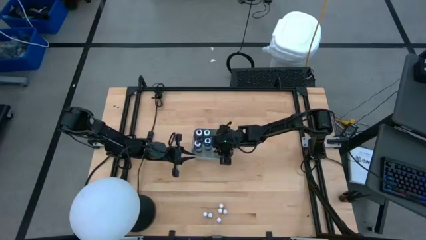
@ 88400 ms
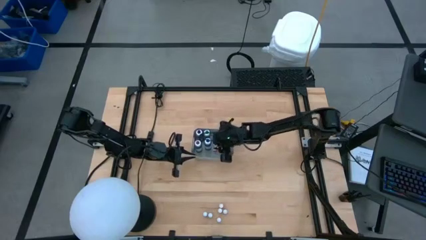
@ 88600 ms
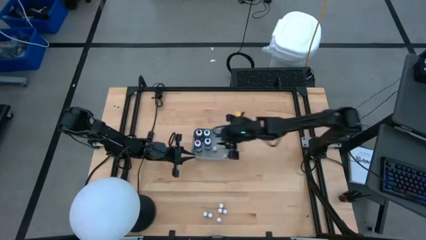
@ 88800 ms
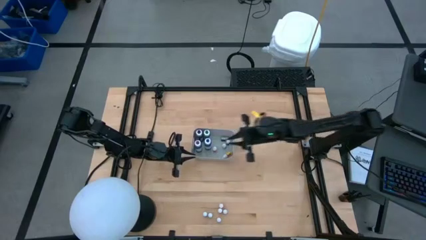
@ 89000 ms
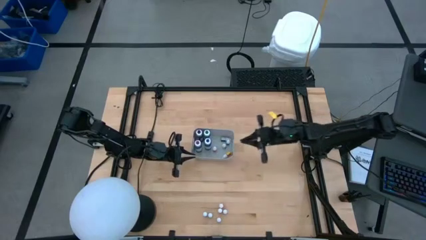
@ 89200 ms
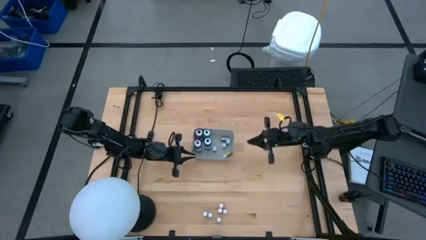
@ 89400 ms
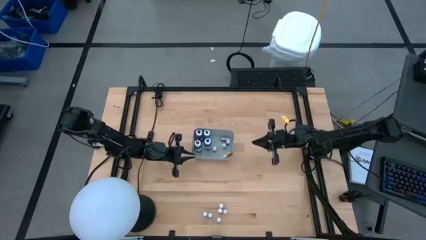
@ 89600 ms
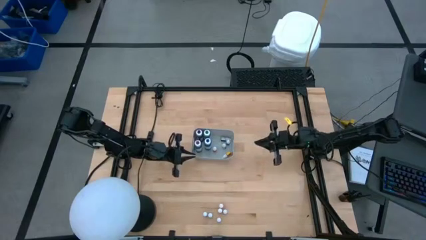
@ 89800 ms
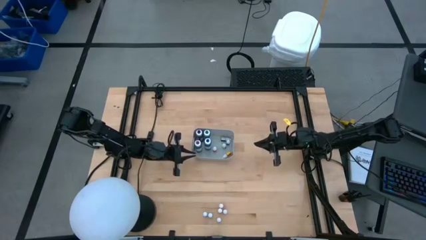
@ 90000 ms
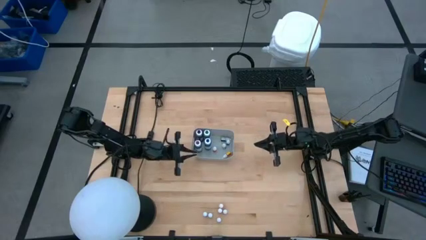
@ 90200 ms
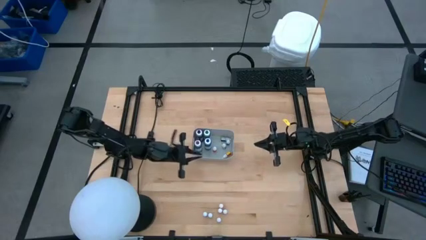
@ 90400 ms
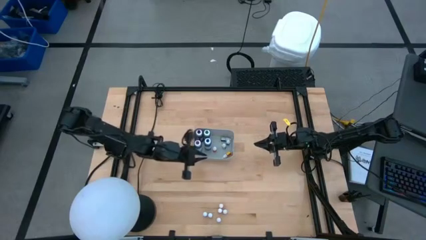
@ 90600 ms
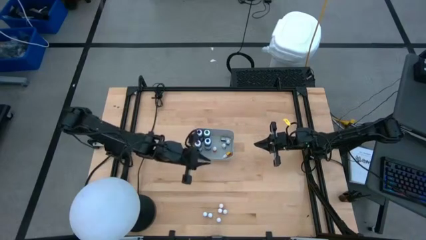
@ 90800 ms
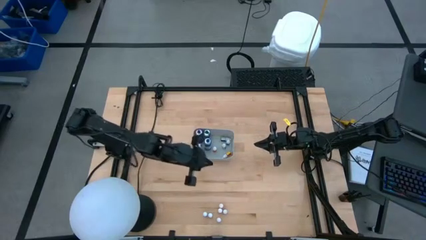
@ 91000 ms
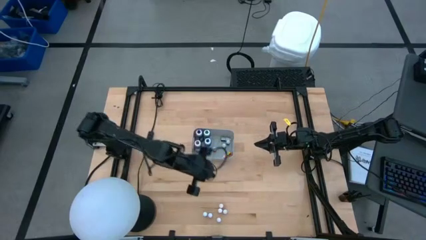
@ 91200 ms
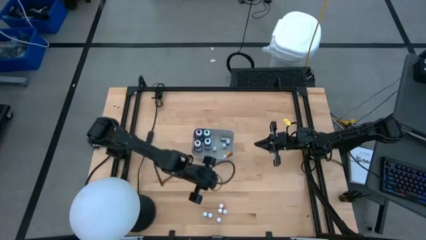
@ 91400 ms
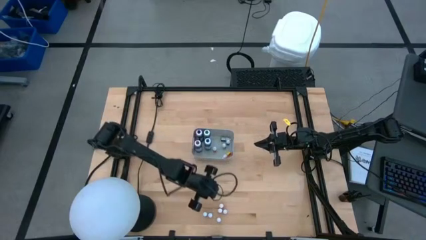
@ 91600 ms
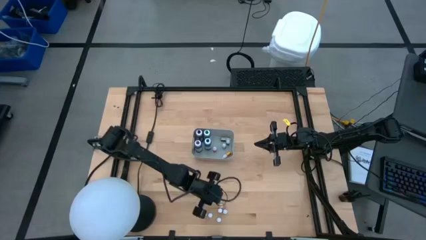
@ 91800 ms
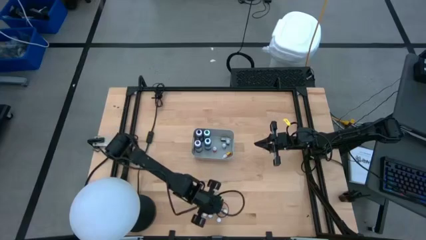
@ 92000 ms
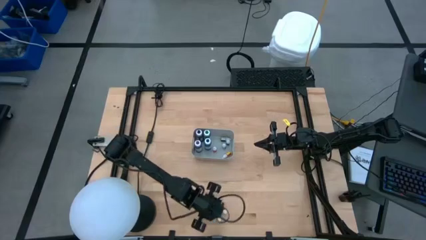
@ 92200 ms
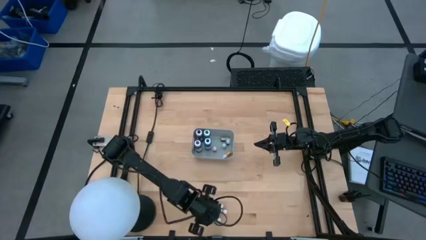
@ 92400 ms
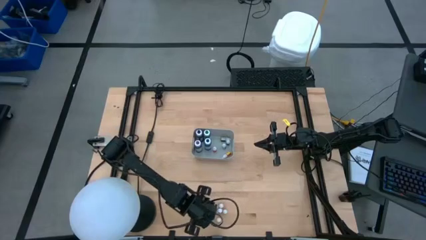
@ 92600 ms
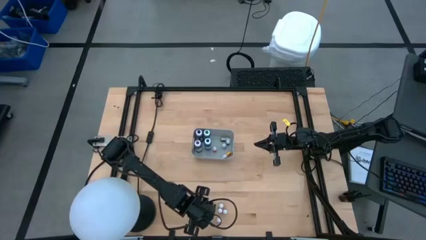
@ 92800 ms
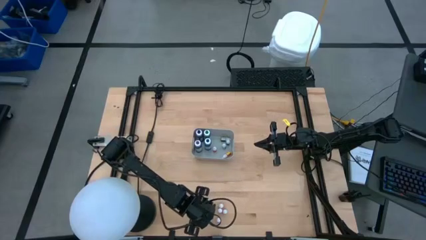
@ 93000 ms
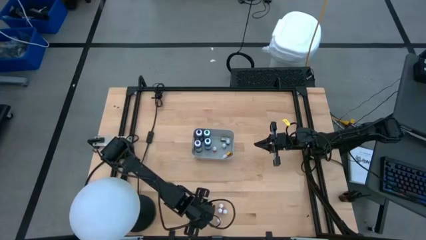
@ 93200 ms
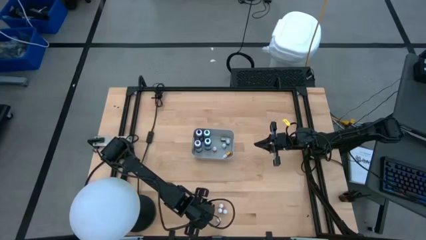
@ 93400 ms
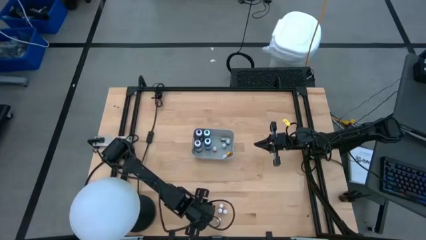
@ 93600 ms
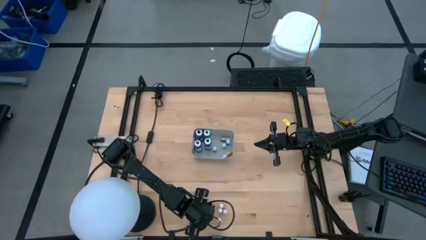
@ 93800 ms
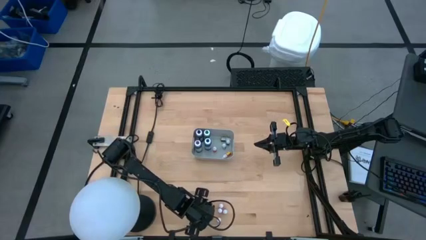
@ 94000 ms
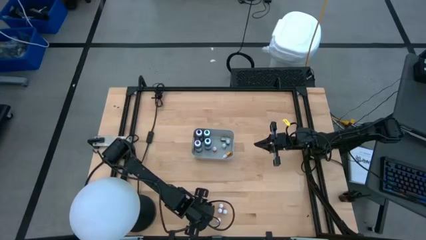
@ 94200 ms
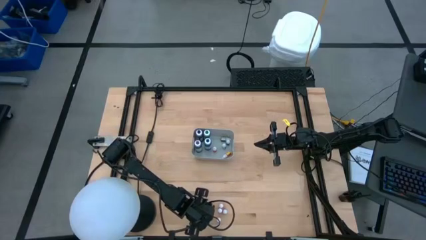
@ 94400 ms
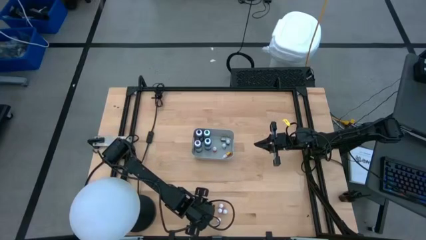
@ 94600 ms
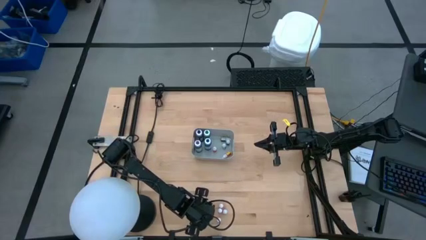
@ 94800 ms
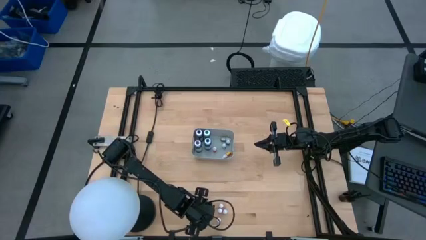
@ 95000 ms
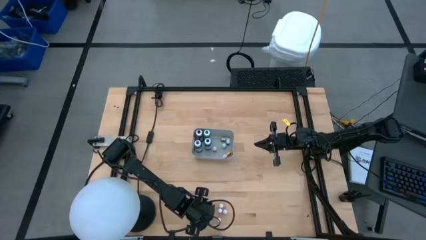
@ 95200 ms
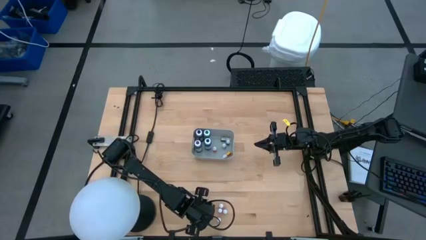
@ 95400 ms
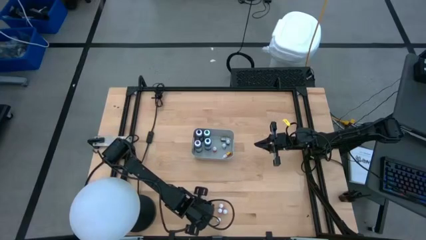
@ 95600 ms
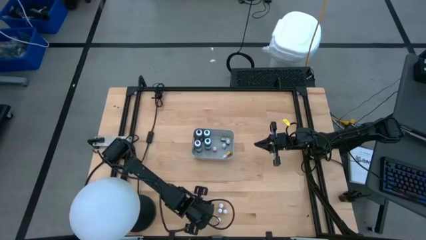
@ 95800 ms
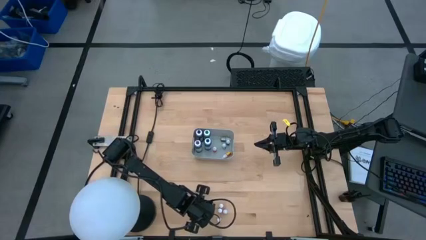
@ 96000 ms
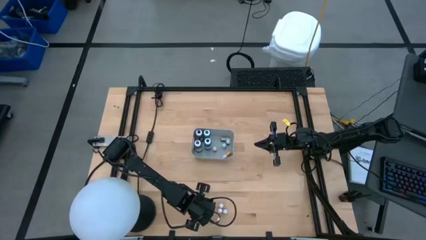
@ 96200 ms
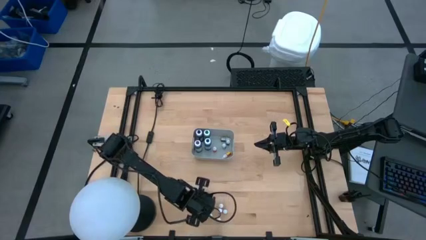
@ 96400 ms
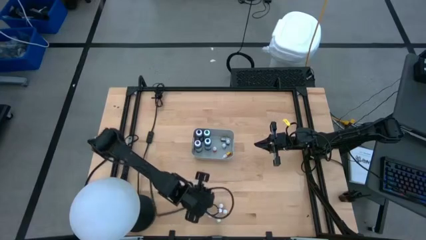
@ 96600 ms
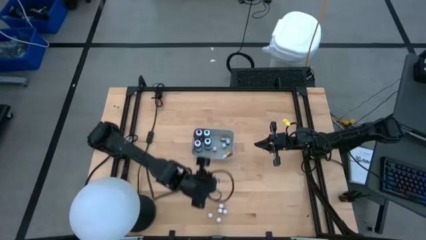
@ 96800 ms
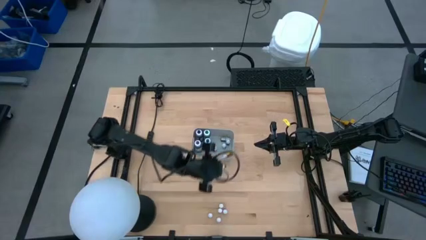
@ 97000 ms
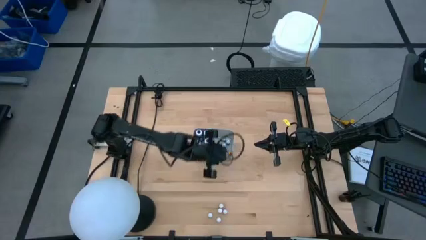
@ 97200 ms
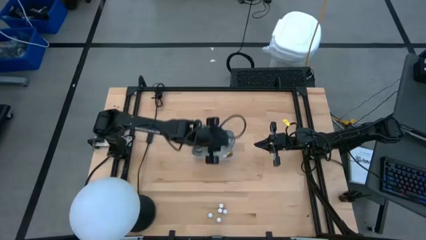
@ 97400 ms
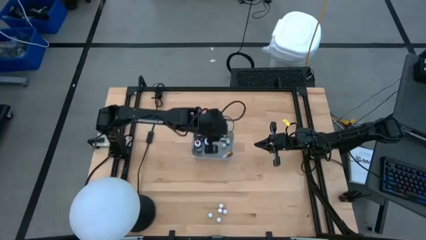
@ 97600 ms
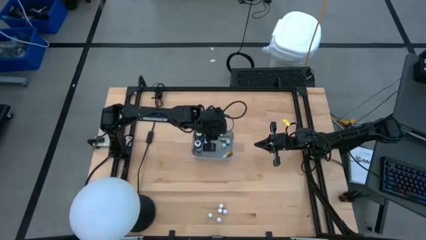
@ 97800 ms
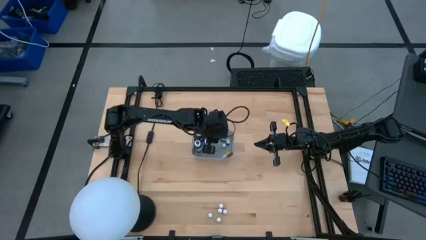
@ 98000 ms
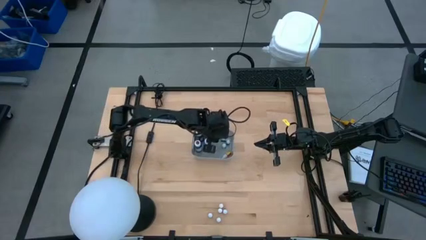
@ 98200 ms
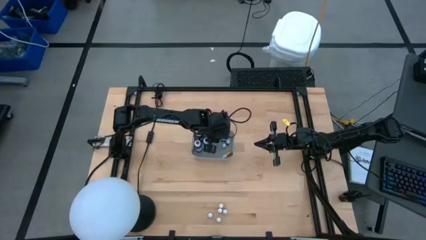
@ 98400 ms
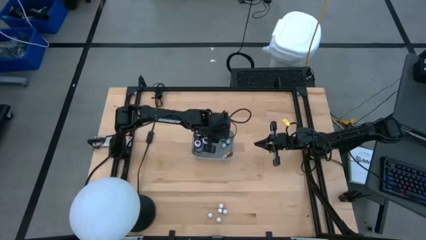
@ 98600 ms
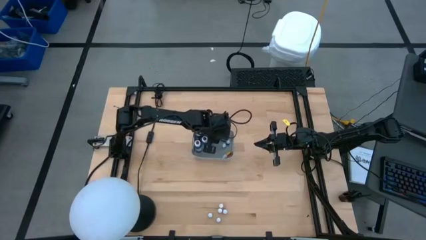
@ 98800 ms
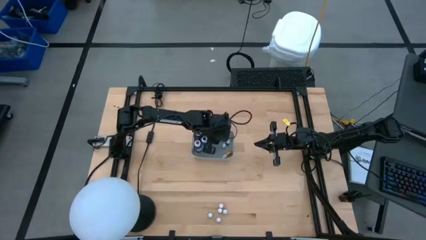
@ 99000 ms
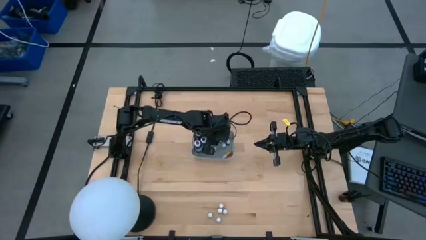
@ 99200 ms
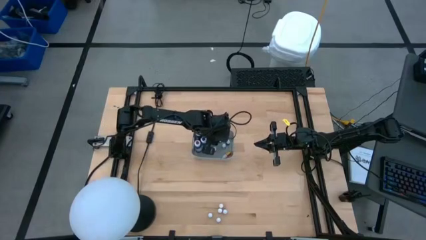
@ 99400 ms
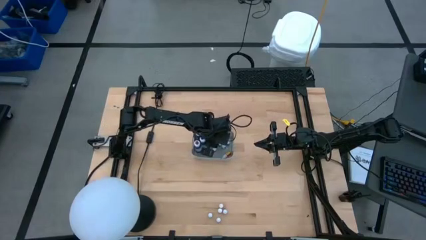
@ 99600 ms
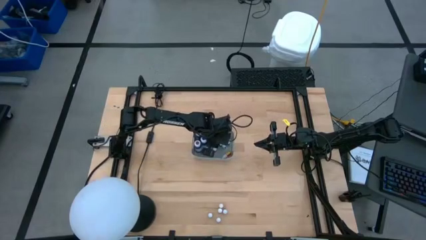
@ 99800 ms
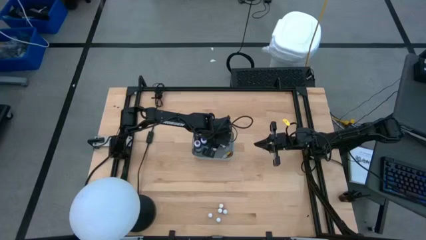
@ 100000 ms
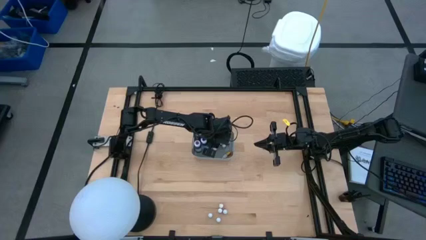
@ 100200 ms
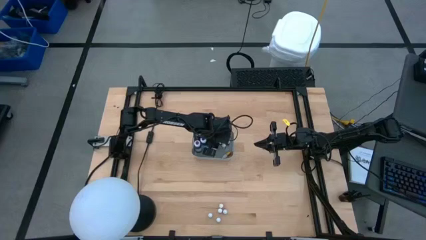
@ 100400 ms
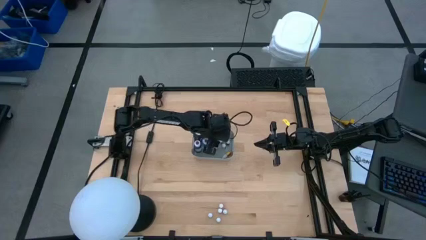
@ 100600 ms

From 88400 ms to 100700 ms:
Task: Pick & Place food coloring
Put the small black food coloring bottle into the gray bin

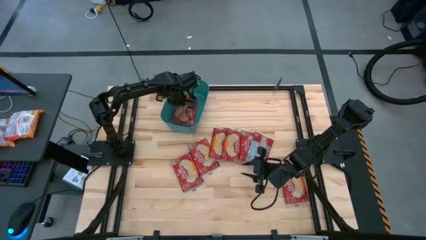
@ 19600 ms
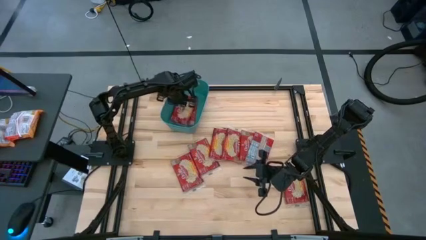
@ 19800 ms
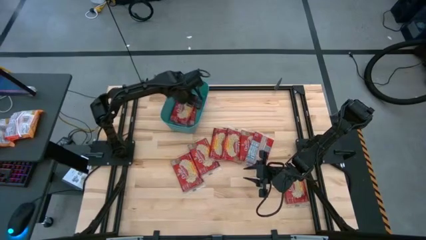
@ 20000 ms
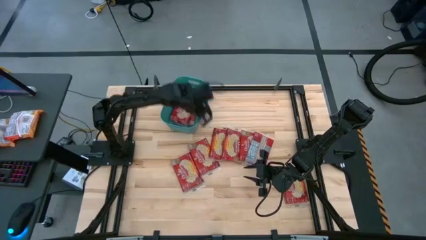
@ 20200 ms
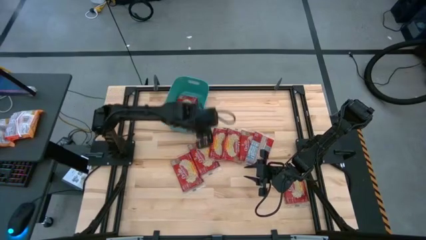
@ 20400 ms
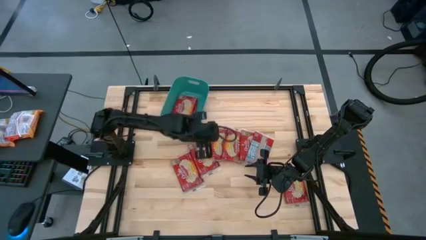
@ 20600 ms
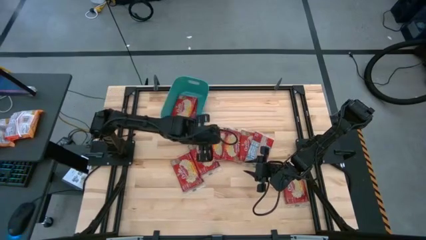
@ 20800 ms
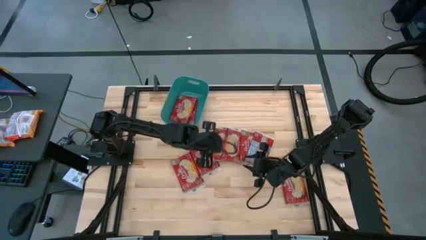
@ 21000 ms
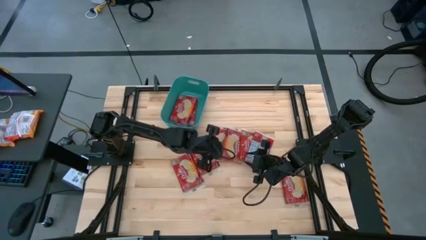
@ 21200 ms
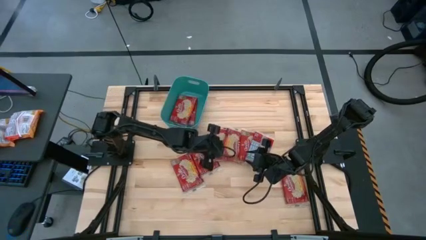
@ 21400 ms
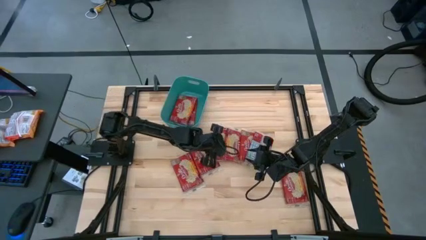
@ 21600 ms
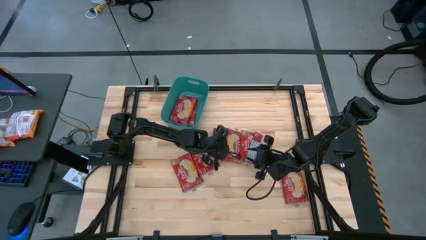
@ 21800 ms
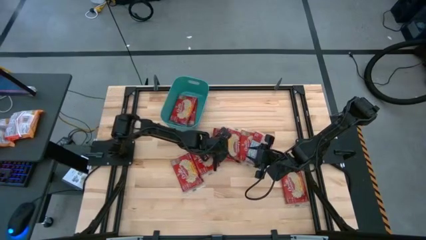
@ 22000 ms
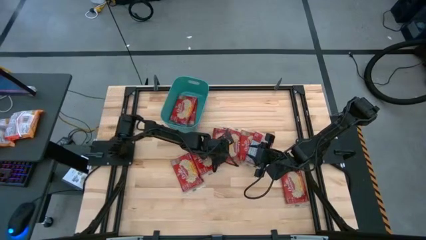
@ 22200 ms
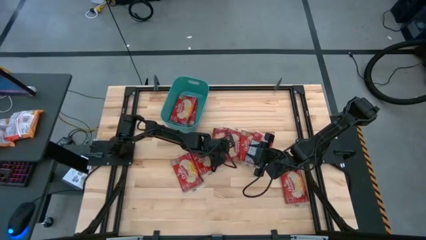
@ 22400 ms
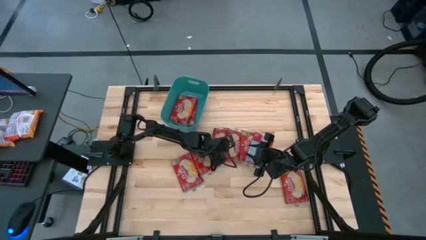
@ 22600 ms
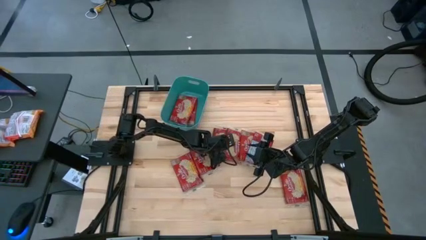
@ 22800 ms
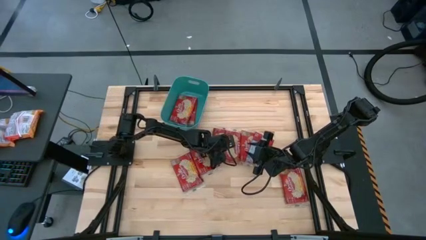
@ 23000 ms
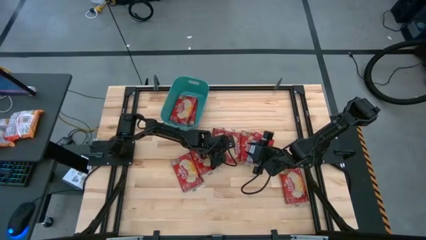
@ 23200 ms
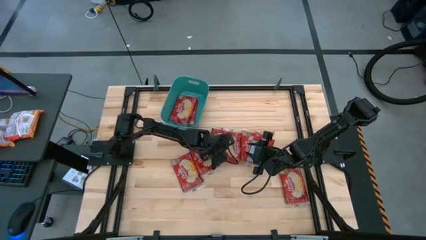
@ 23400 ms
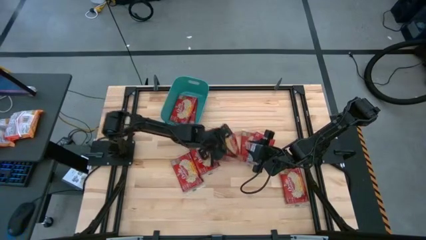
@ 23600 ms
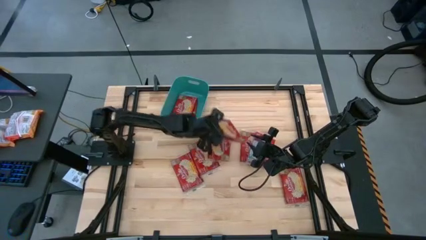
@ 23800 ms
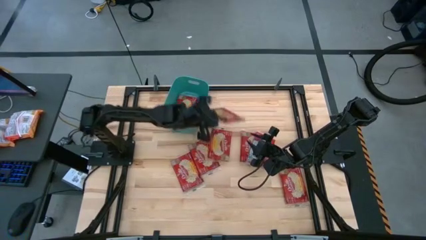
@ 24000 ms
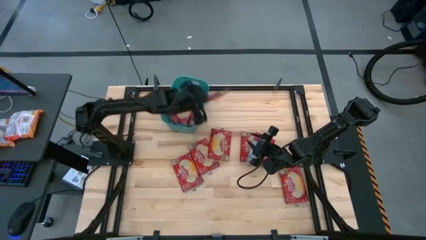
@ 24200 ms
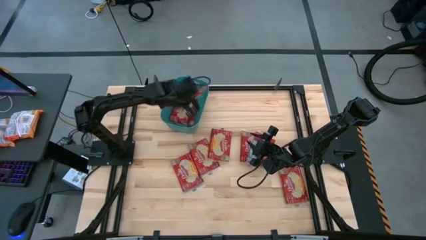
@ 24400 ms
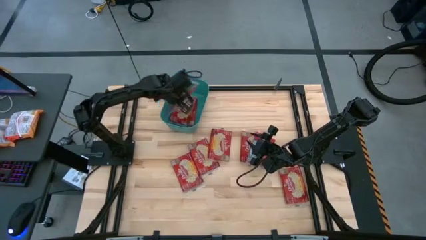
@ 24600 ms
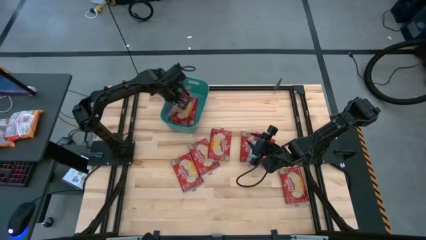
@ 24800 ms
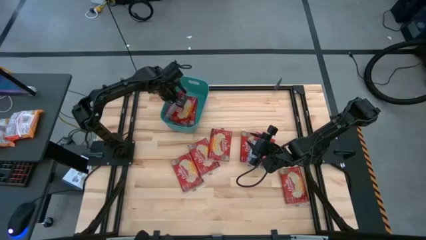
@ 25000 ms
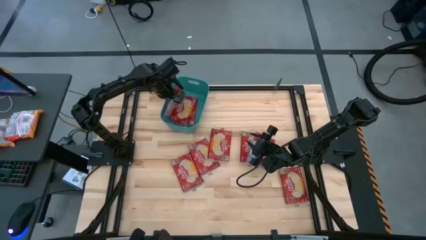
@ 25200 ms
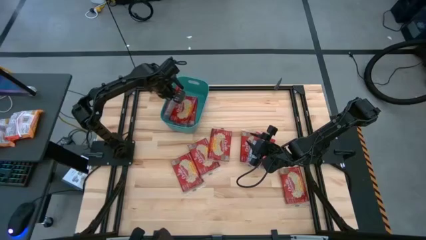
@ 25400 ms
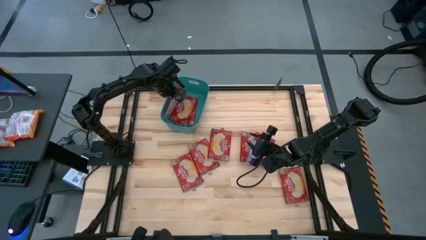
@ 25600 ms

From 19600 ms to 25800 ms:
Task: Sort popcorn bags into baskets
Put the red popcorn bag into the green bin
